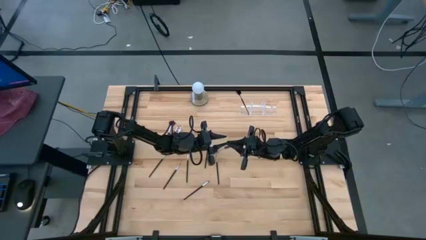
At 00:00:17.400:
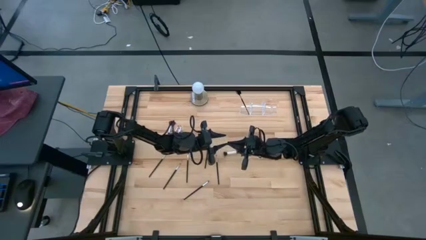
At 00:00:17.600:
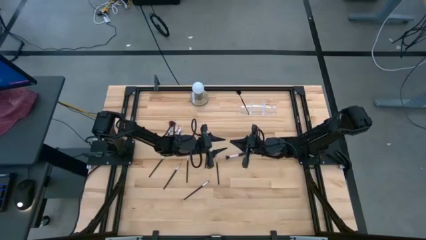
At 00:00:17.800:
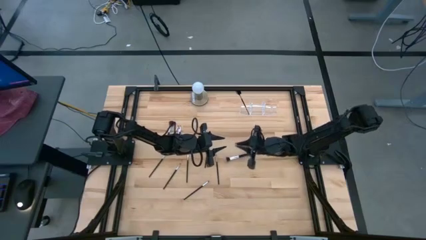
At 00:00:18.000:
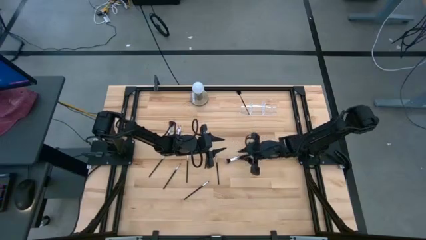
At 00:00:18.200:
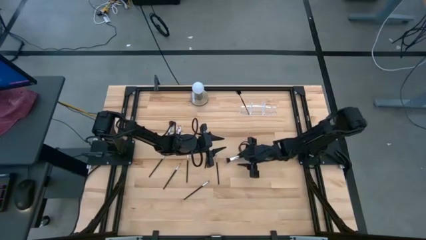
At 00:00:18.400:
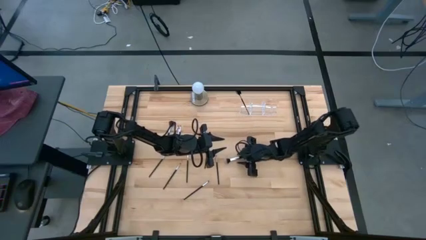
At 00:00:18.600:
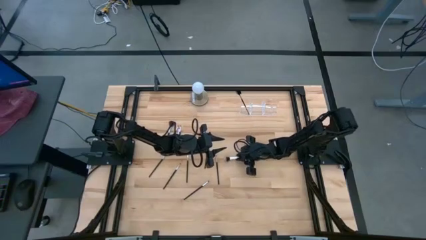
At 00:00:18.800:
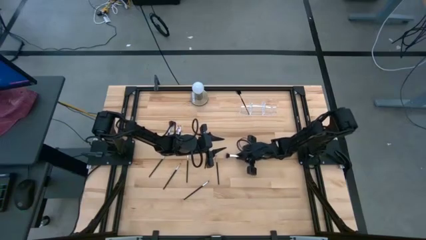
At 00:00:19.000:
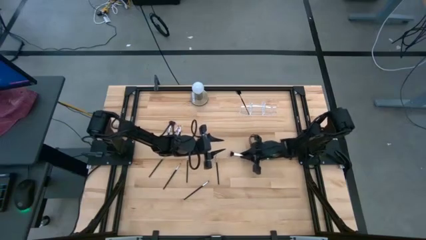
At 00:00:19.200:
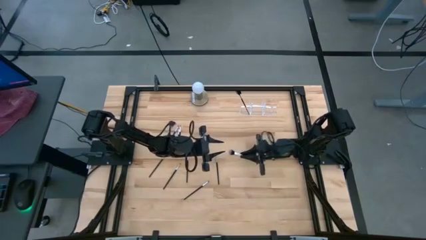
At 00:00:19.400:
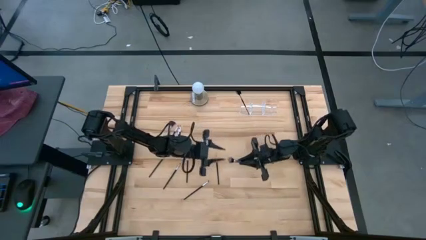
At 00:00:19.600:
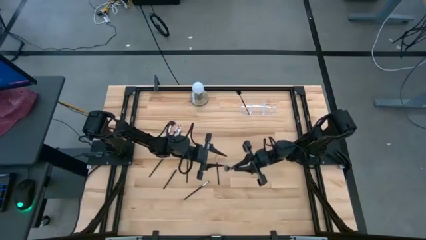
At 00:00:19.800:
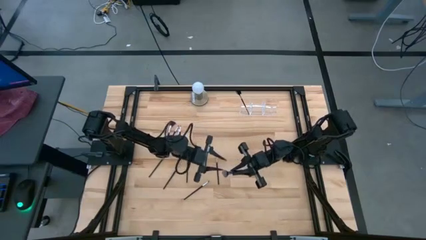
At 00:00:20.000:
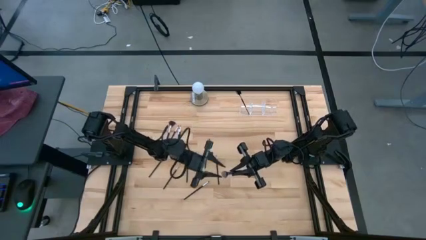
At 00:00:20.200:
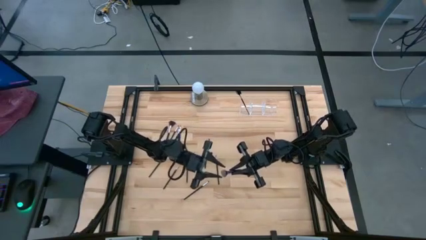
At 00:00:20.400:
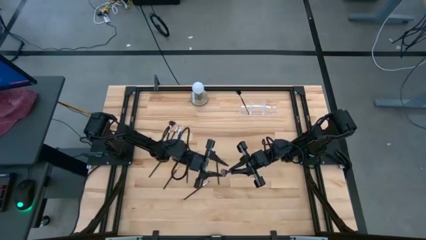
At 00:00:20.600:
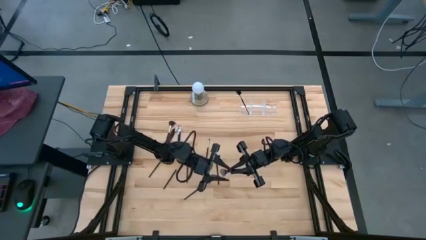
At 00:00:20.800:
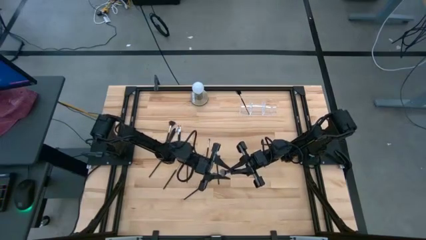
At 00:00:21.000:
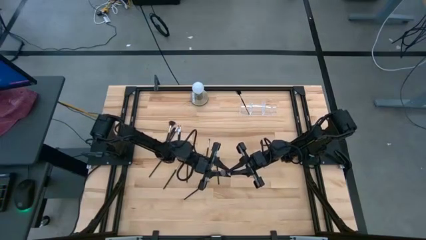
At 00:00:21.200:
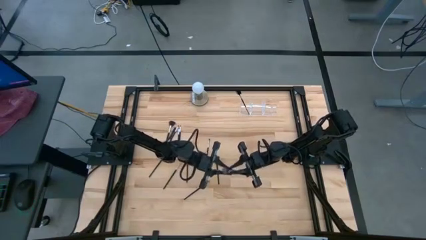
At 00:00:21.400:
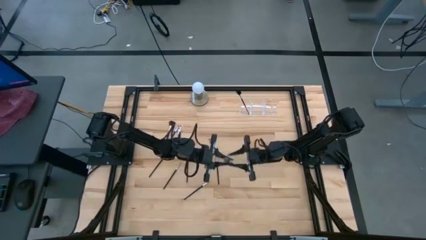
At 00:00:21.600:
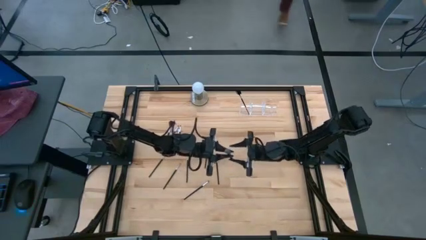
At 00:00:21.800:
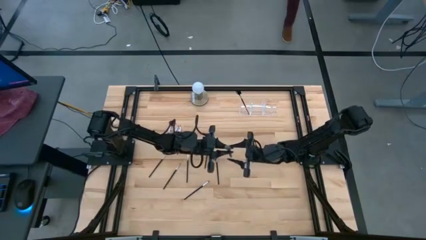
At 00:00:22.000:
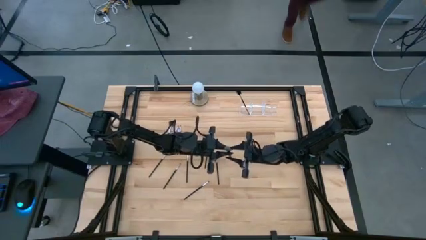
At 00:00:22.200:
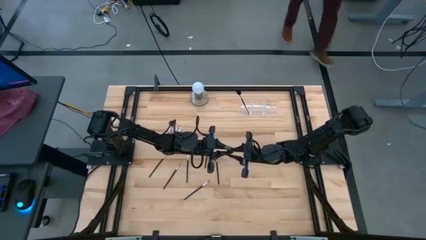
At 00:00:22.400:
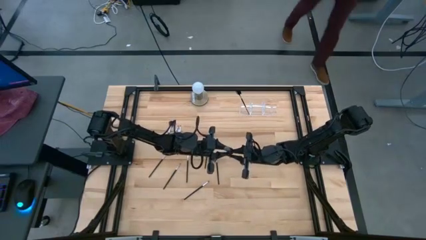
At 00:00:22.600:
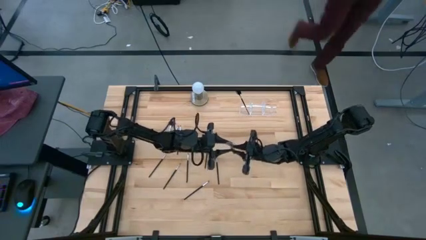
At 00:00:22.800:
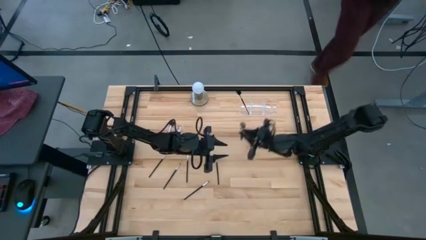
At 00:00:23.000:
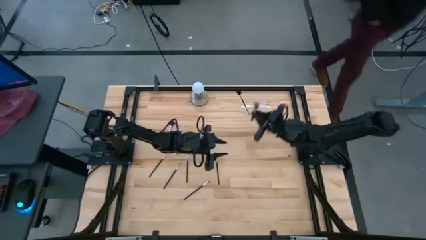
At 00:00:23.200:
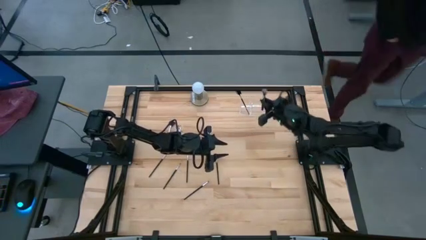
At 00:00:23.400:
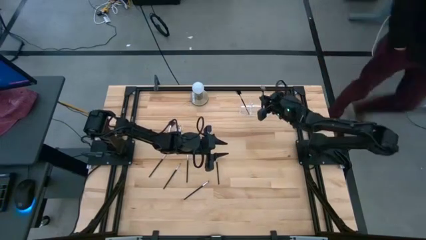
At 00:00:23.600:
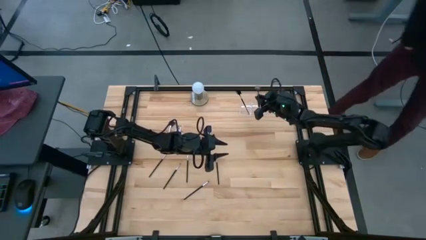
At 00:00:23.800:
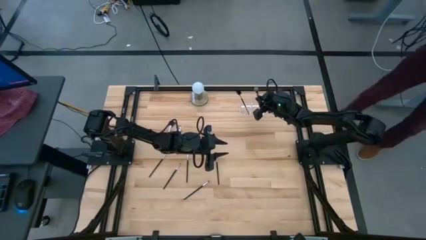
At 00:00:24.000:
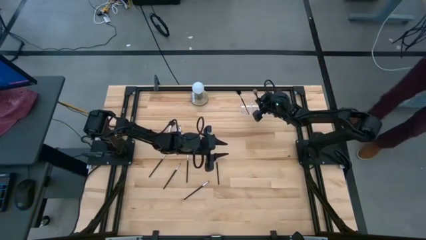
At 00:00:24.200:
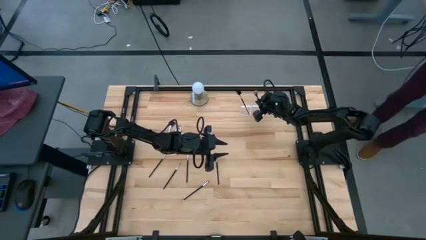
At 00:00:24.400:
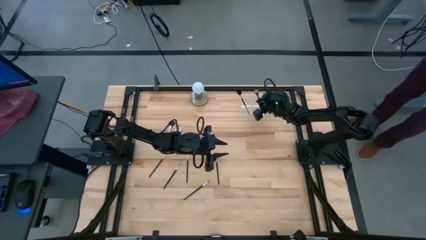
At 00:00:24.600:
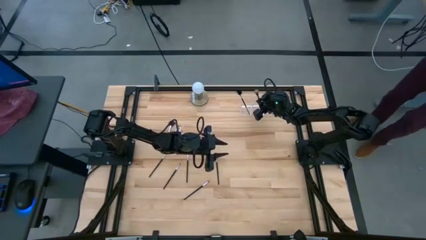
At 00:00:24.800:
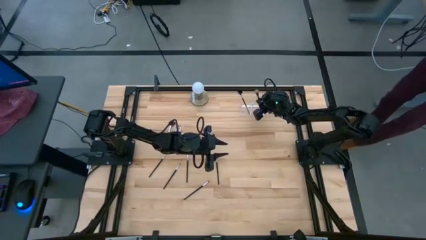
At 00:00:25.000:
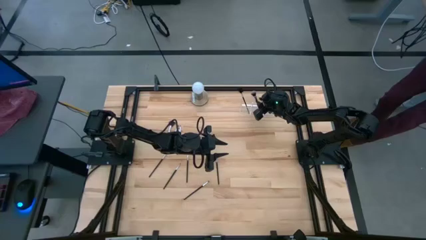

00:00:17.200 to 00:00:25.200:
Task: Put items in baskets/containers
Put the silver powder brush into the transparent organizer

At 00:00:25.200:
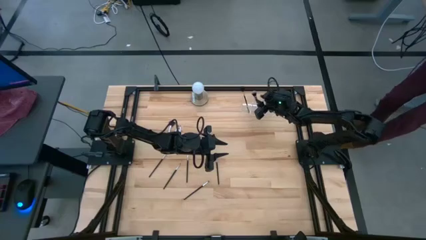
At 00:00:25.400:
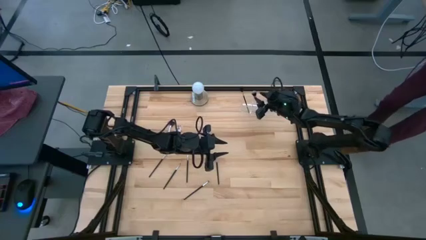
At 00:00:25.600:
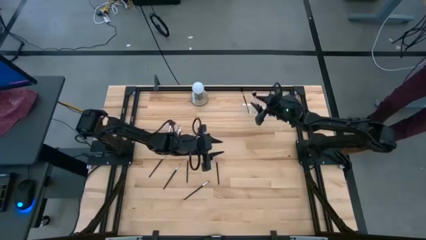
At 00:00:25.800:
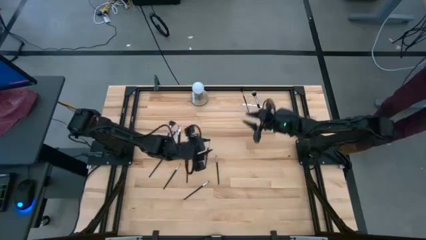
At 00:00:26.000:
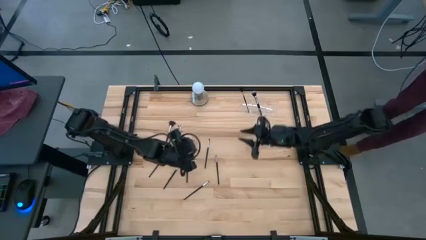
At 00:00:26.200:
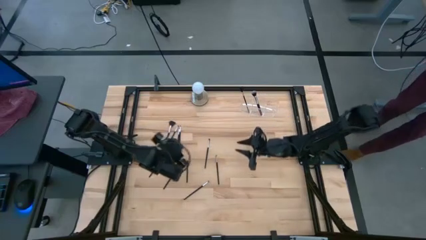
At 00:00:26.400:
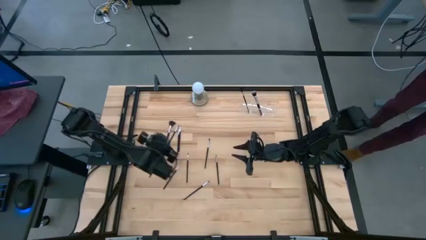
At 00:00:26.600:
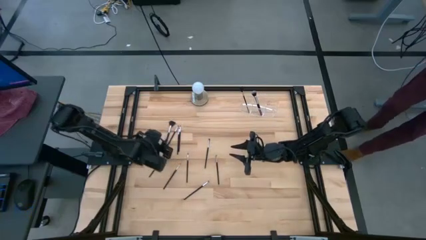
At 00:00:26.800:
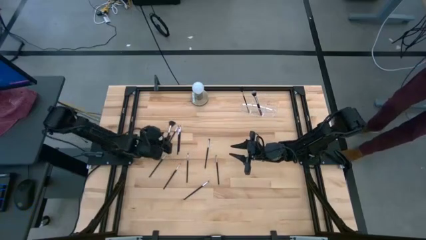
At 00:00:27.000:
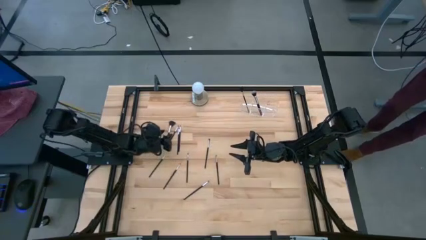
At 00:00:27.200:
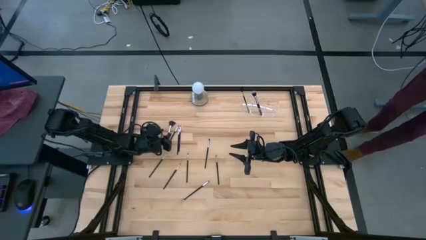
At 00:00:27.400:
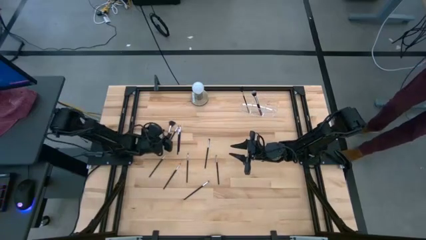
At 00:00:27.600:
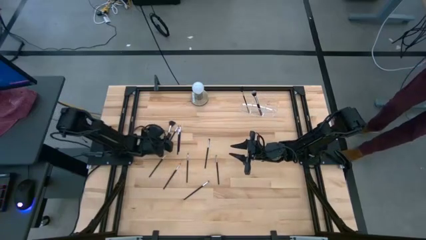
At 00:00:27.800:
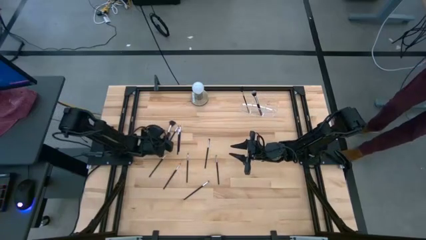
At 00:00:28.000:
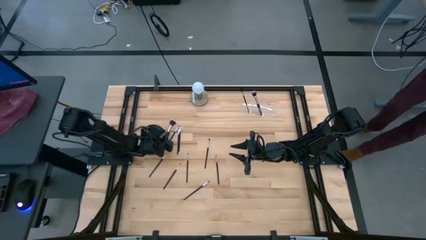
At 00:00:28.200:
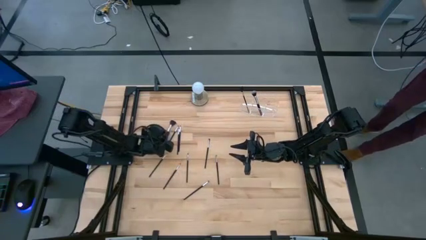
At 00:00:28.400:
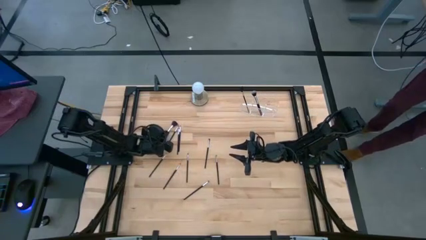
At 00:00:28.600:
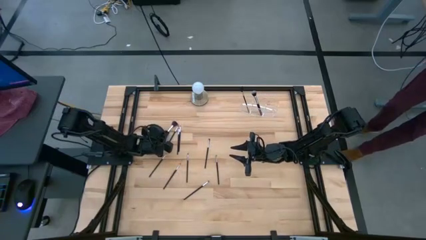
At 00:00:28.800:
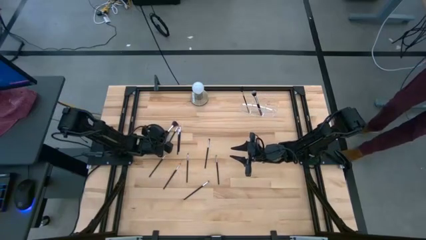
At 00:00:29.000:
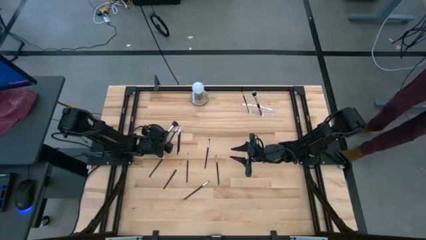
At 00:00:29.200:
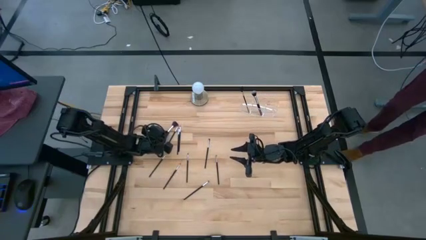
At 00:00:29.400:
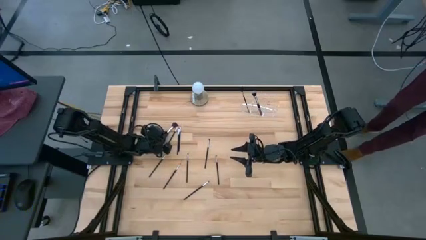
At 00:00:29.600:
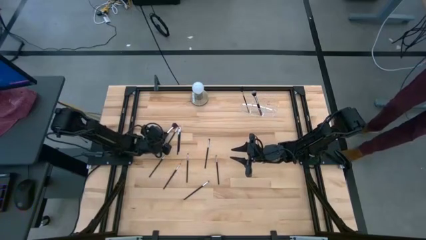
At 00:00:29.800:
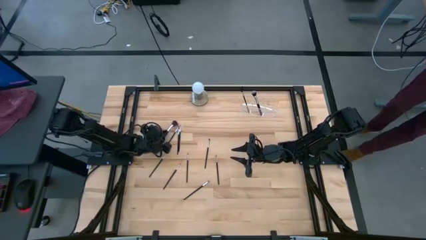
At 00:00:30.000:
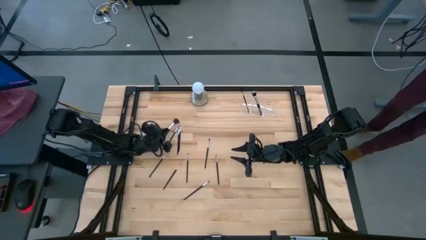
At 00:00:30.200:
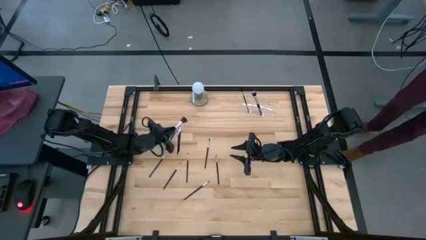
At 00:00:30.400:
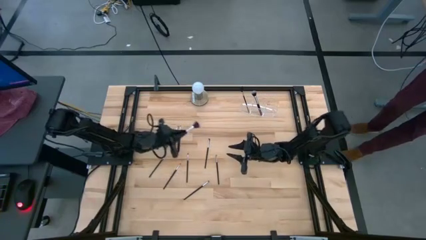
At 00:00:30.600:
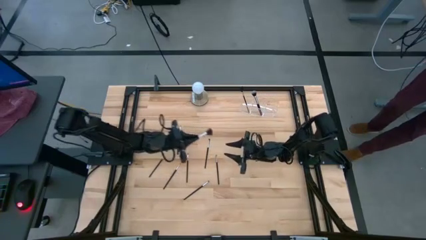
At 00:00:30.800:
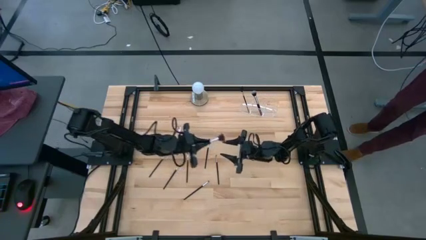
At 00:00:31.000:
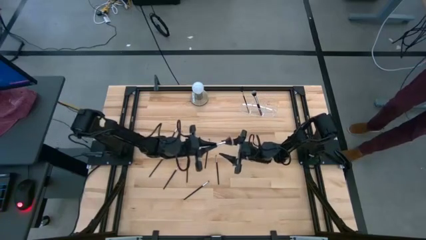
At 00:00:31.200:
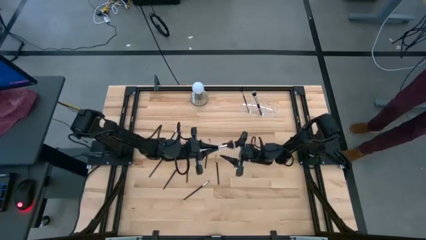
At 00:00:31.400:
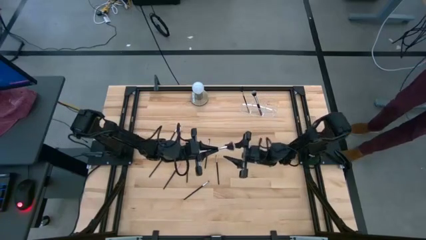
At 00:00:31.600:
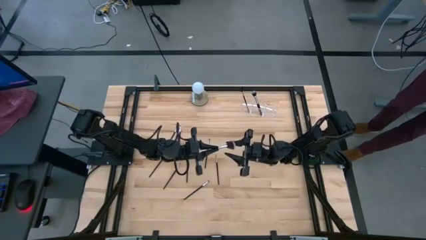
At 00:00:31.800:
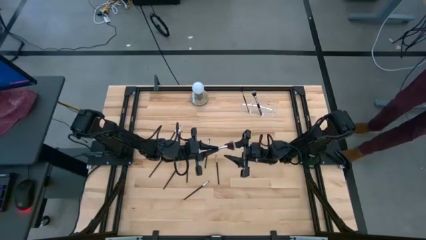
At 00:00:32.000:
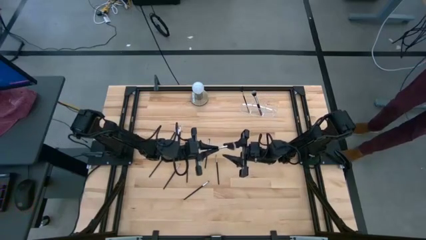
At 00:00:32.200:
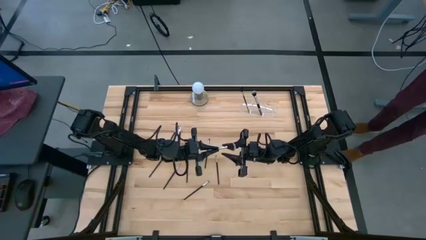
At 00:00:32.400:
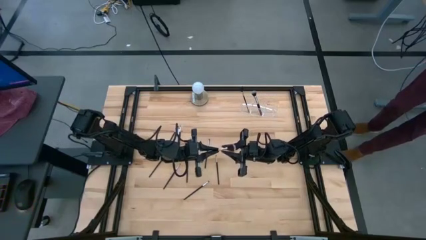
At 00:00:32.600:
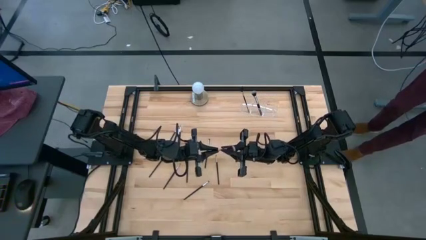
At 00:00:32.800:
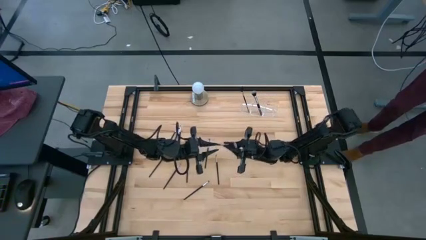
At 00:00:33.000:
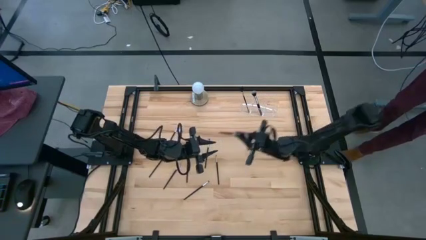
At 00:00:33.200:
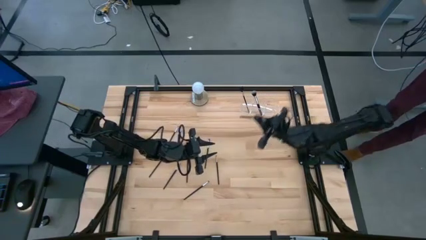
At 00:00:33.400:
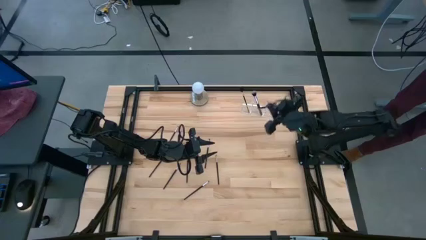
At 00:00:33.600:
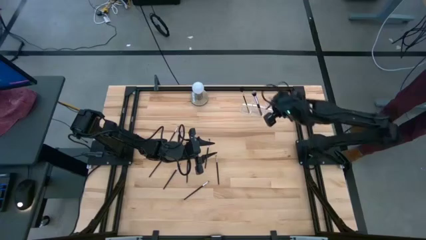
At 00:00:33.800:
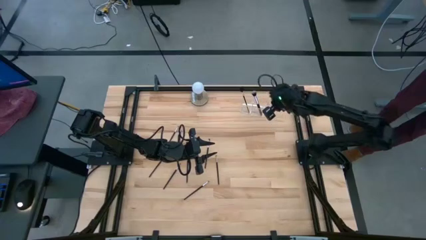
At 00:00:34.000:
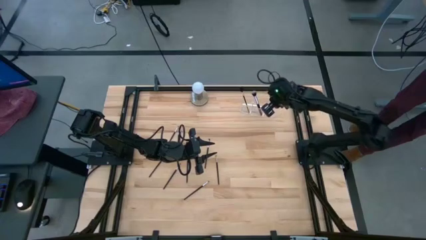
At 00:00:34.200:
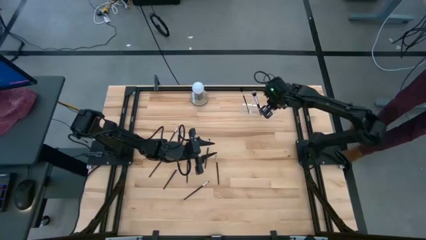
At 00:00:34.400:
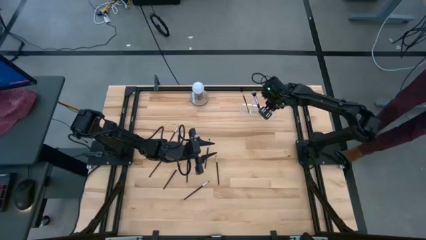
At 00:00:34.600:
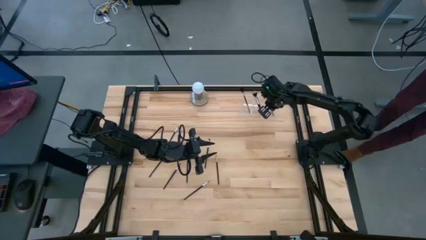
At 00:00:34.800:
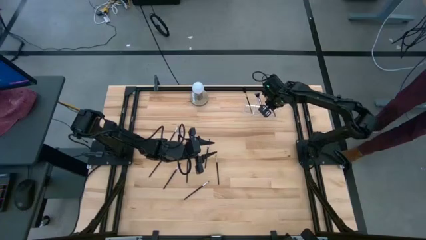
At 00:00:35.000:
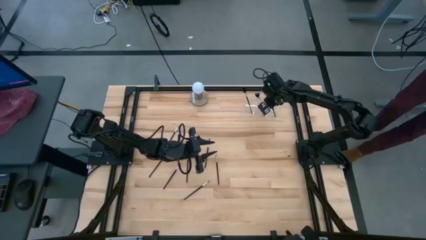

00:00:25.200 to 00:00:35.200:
Put the silver highlighter brush into the transparent organizer
